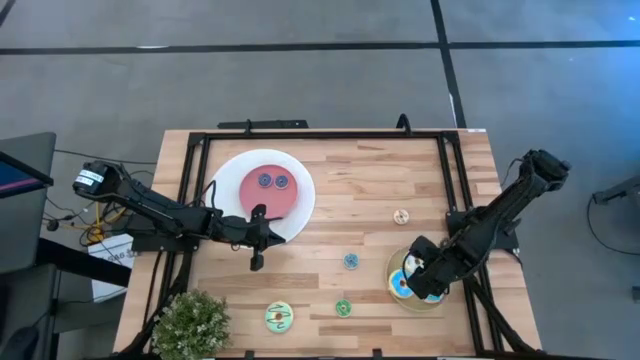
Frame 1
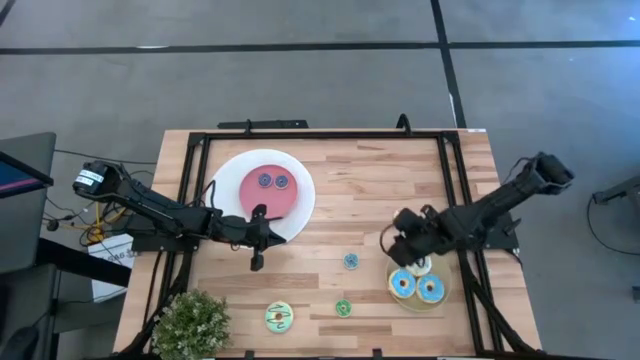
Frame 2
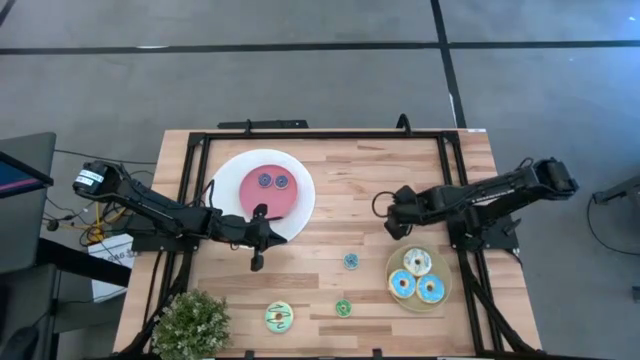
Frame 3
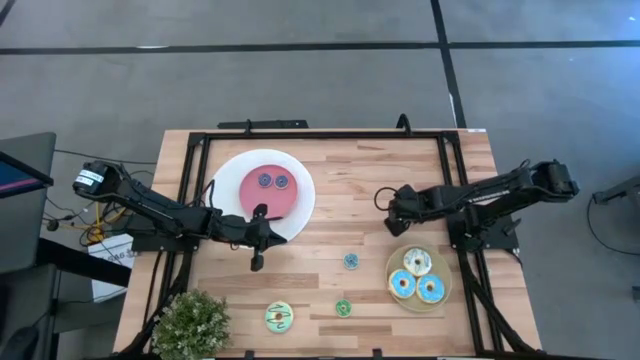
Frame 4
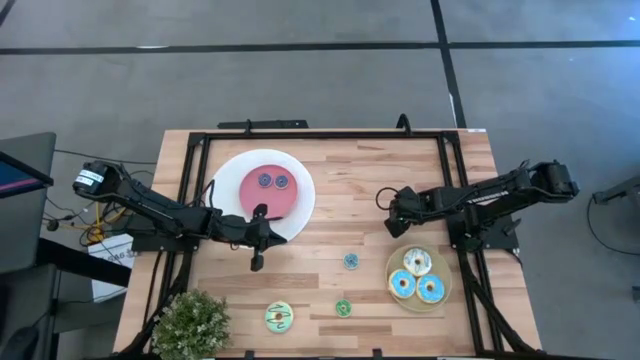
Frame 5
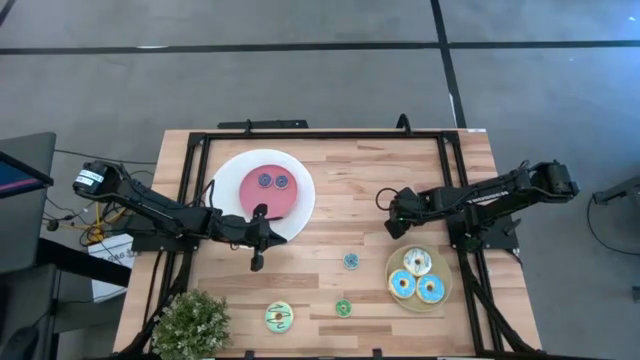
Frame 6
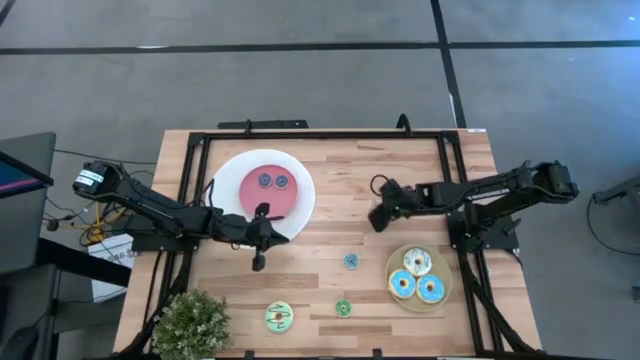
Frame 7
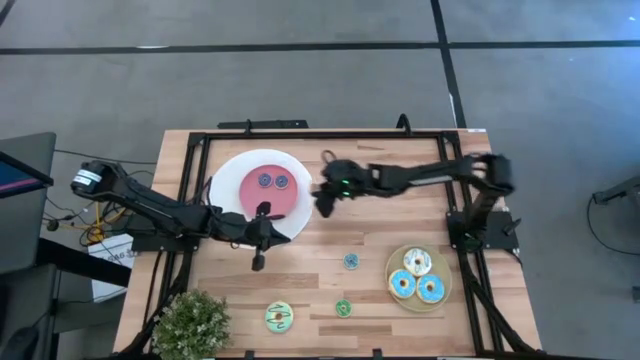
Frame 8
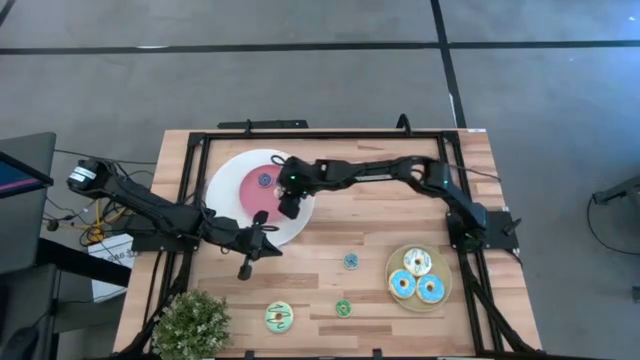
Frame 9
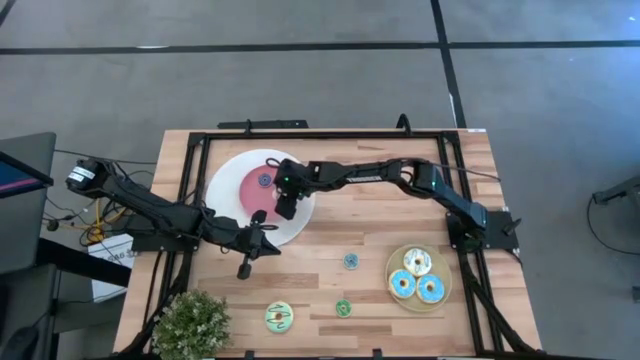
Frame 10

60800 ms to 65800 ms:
Task: Pick & Place donuts
Put the small white donut onto the pink plate

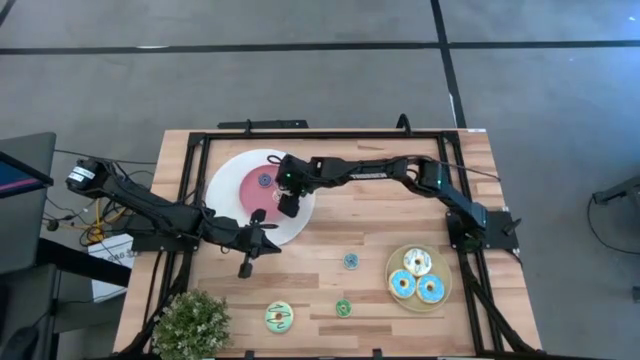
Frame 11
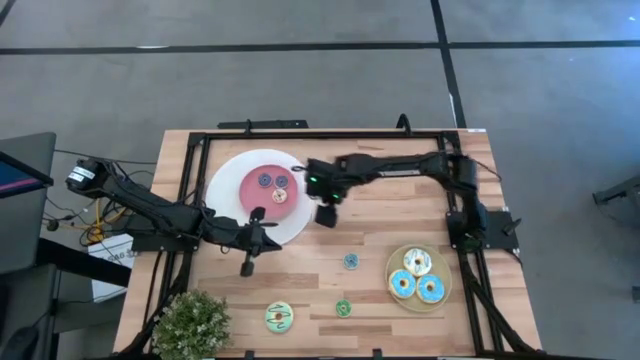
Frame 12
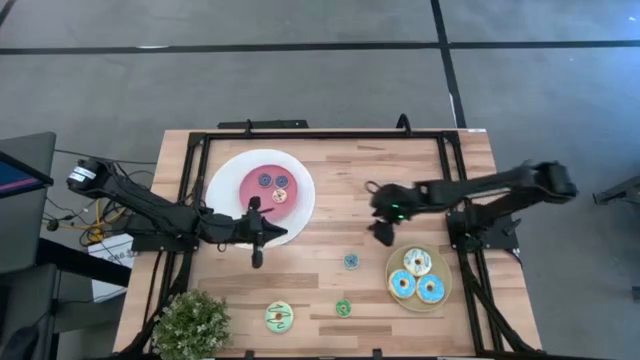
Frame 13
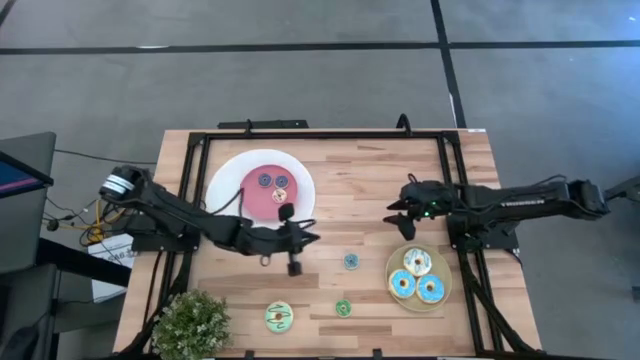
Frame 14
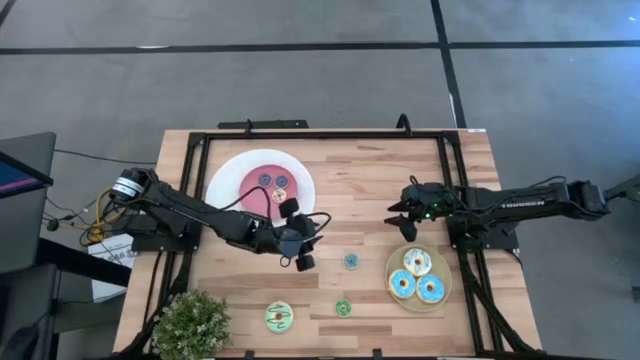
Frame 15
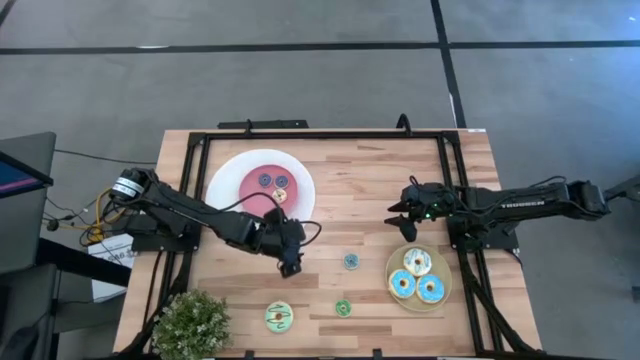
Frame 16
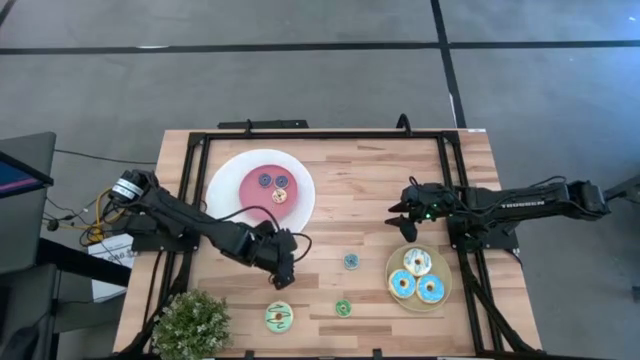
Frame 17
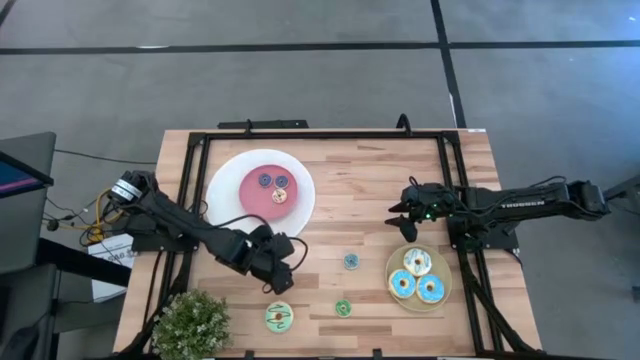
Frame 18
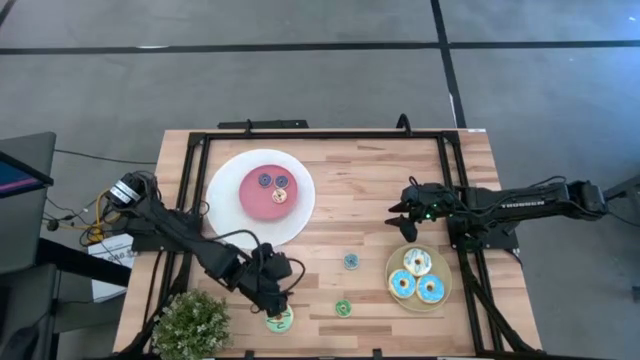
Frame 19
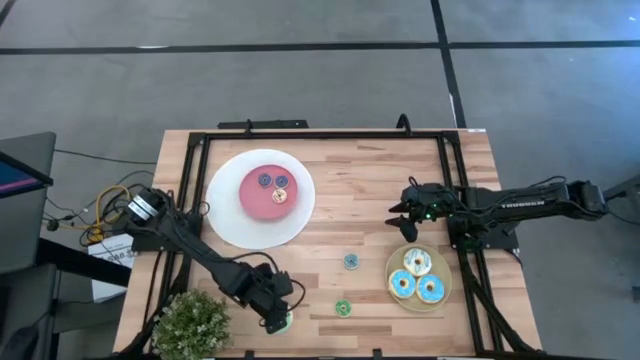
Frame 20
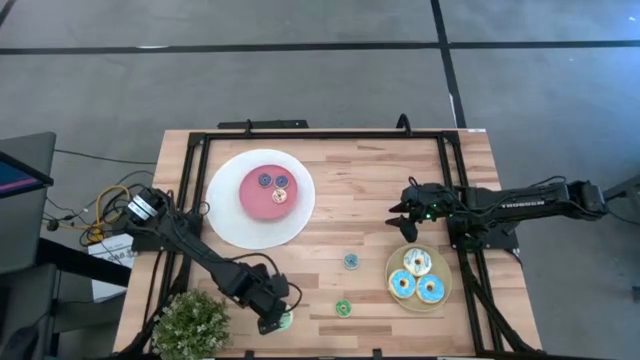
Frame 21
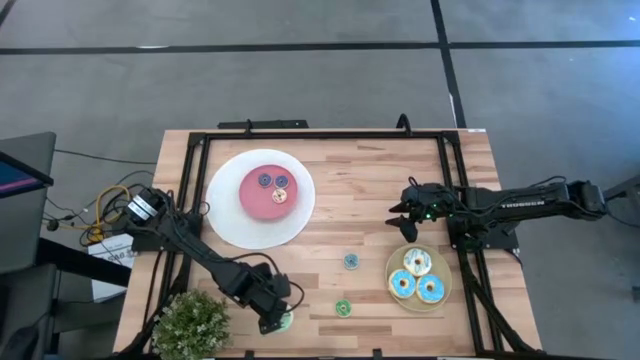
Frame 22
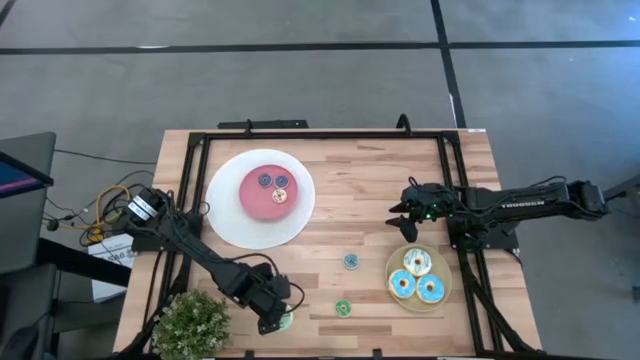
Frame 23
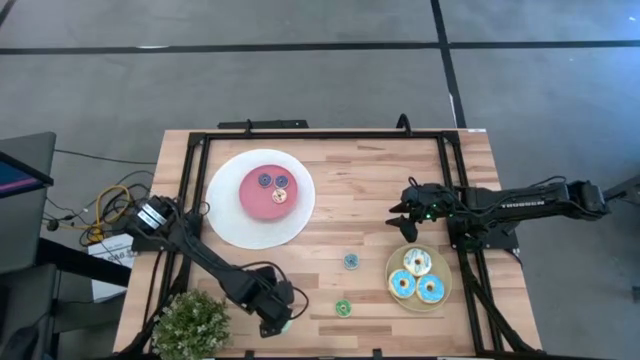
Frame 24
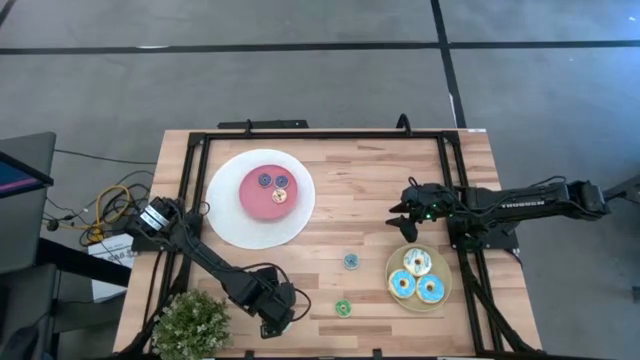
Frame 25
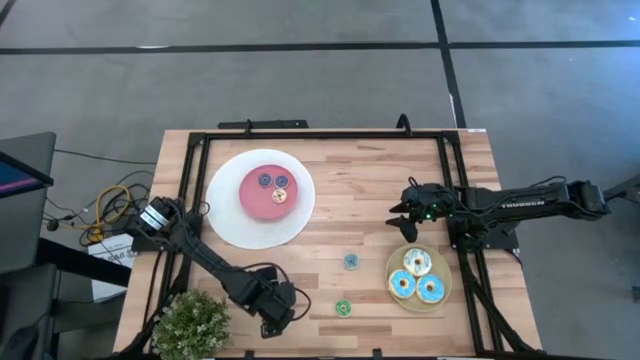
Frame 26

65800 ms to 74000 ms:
Put the large light green donut onto the brown plate

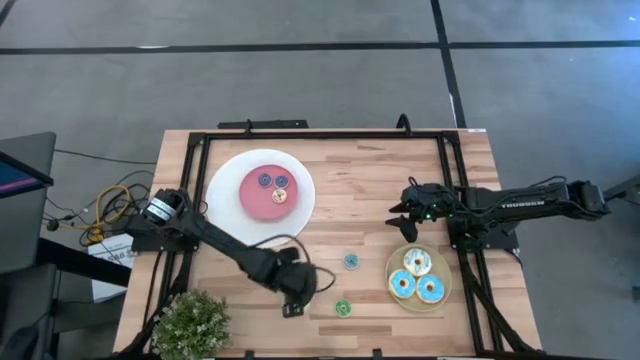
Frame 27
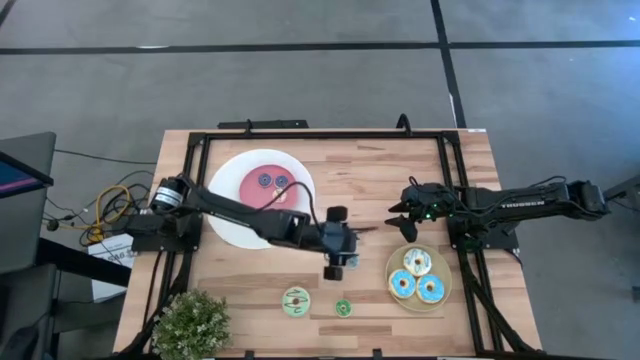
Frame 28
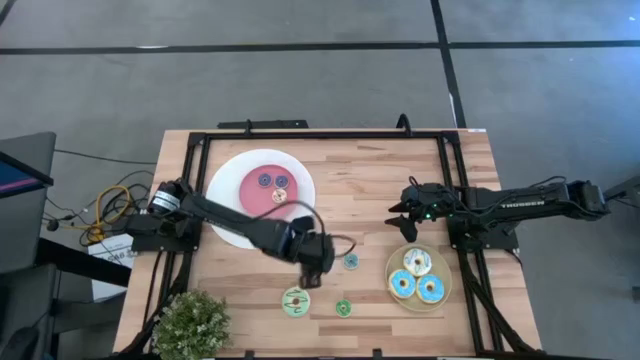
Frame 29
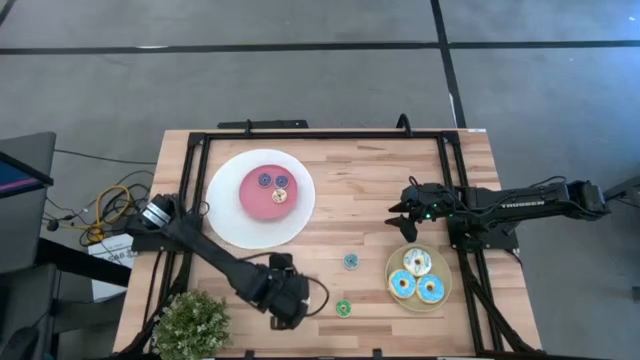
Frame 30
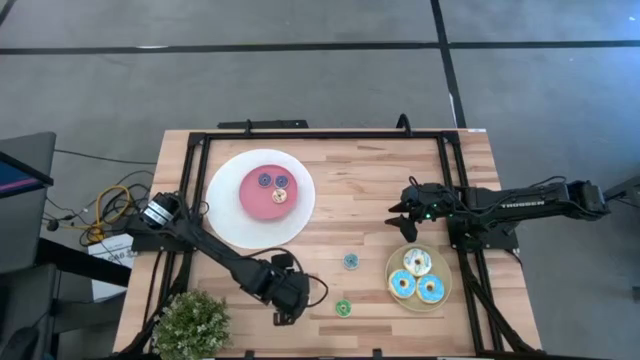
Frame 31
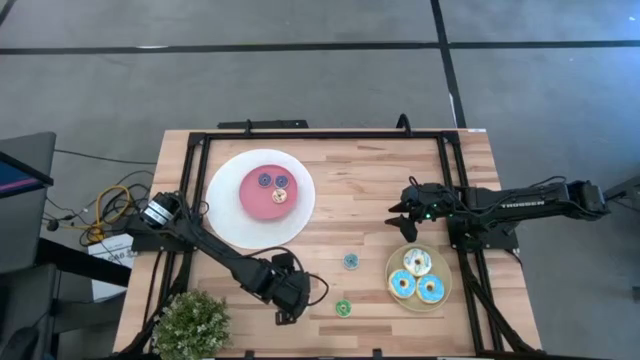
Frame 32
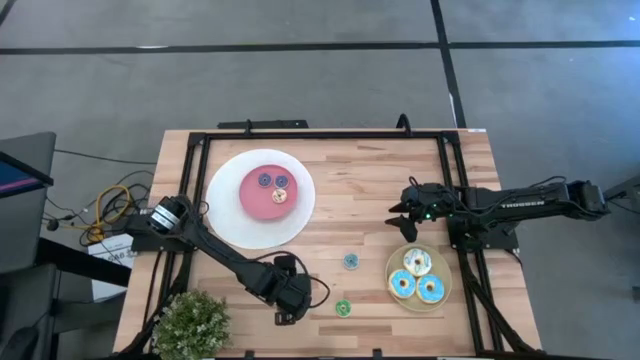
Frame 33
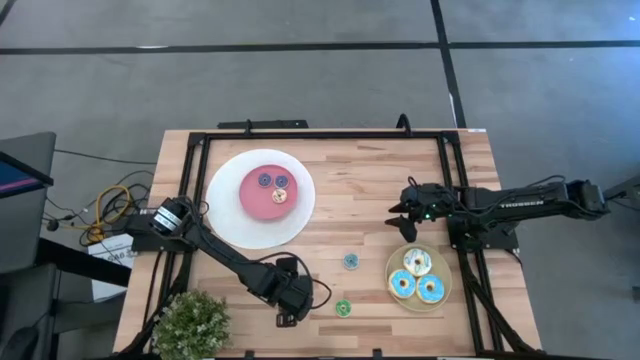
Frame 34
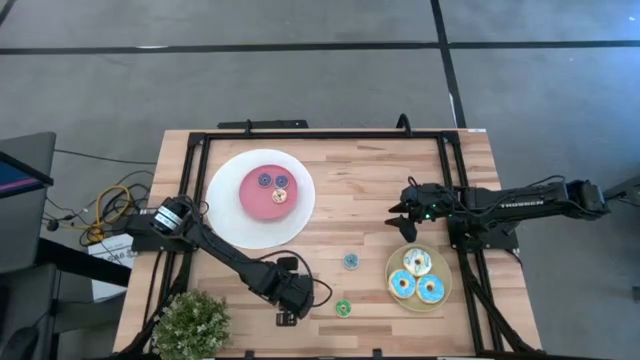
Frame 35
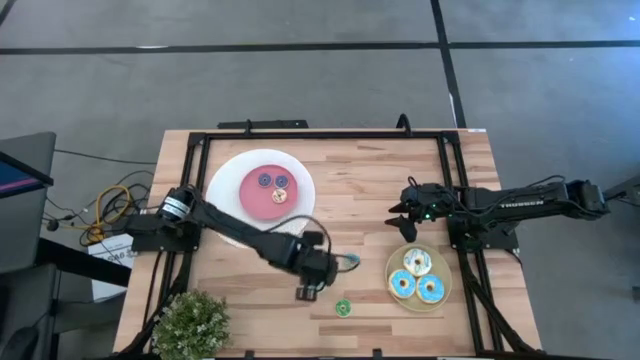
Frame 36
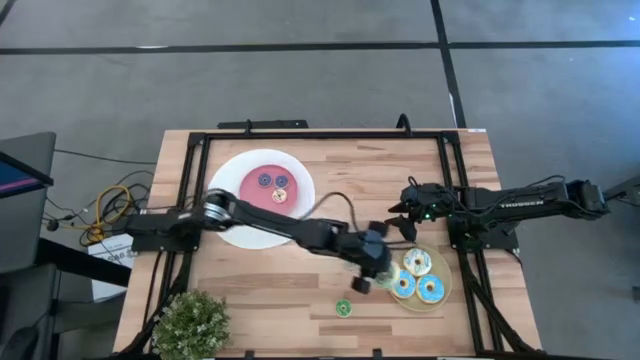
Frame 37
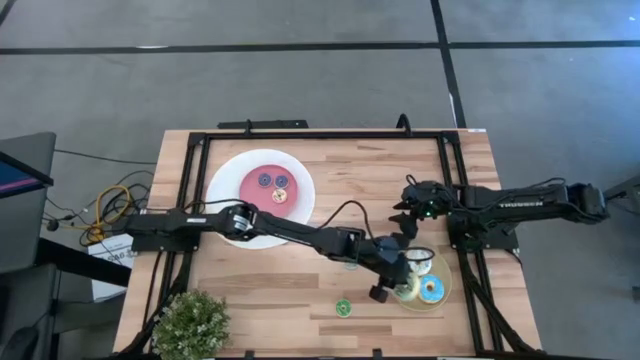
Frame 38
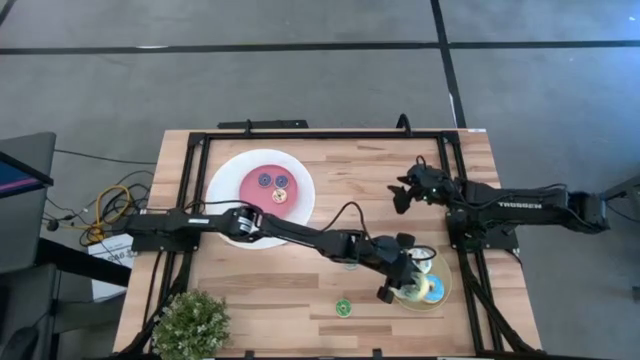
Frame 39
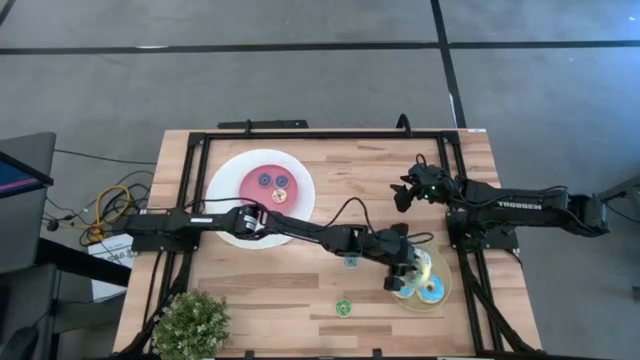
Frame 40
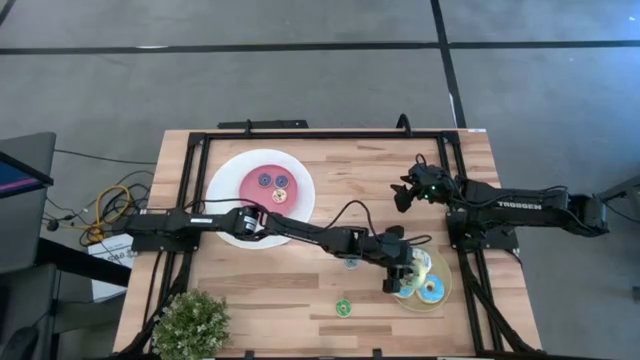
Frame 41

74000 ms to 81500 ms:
Put the large light green donut onto the brown plate
